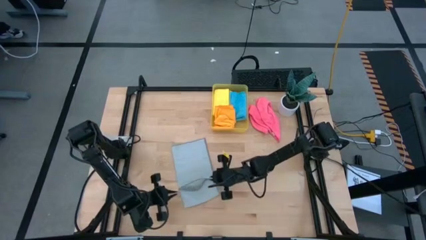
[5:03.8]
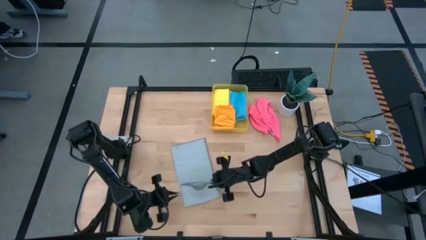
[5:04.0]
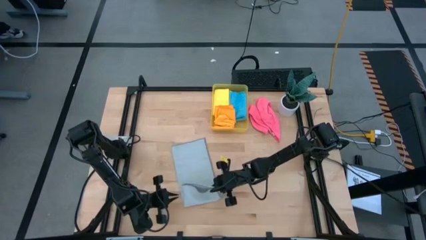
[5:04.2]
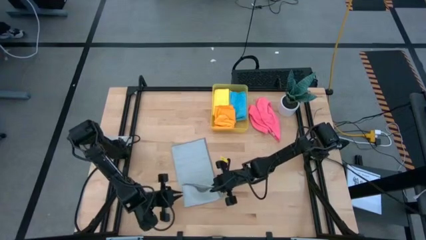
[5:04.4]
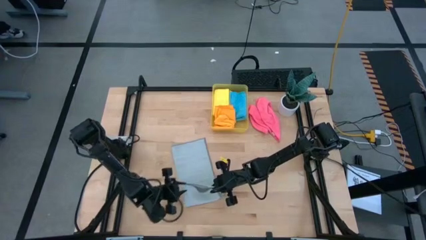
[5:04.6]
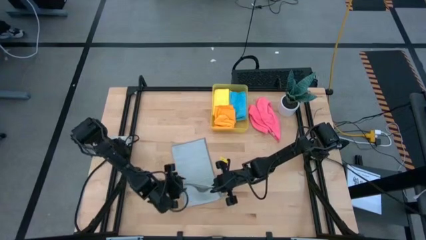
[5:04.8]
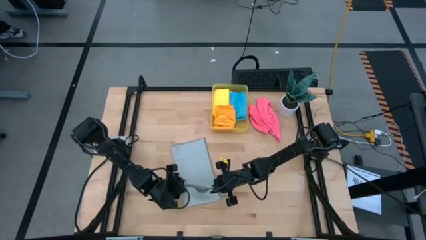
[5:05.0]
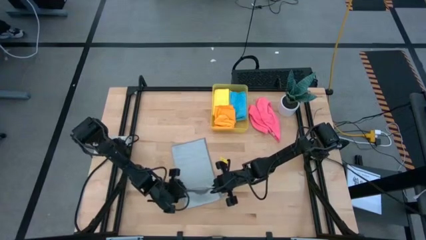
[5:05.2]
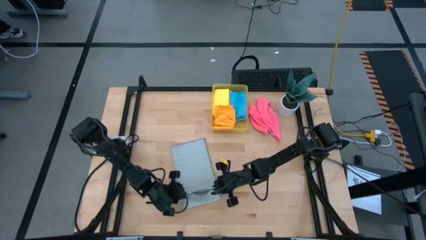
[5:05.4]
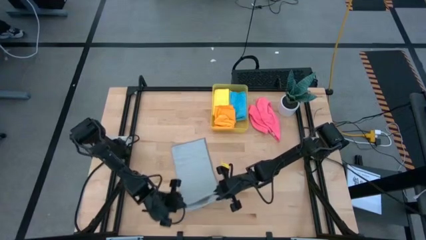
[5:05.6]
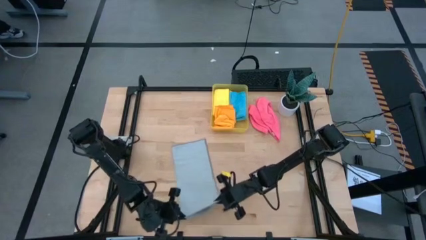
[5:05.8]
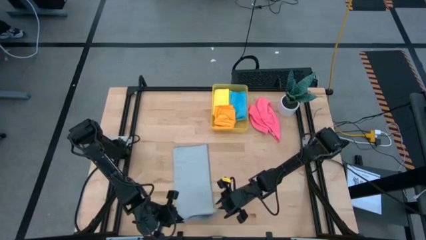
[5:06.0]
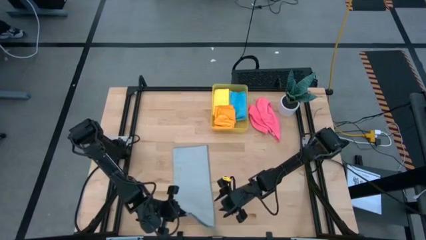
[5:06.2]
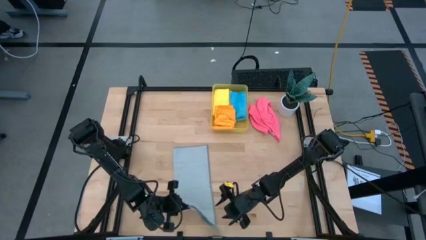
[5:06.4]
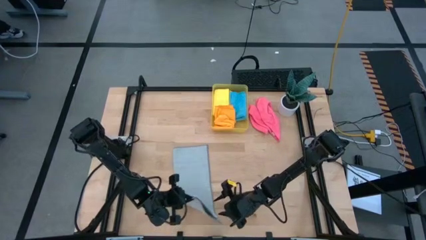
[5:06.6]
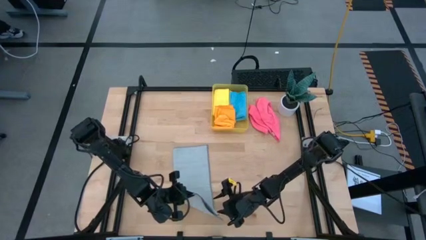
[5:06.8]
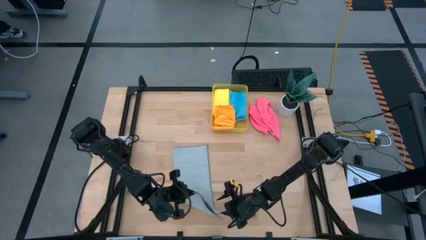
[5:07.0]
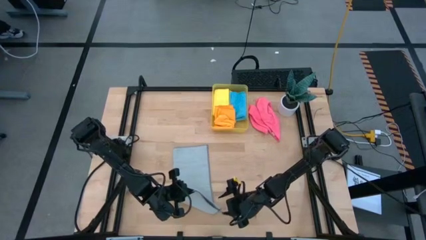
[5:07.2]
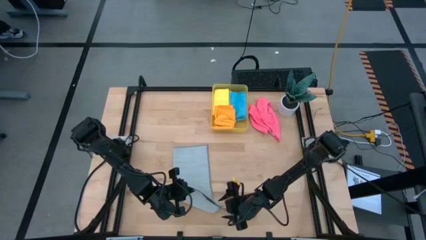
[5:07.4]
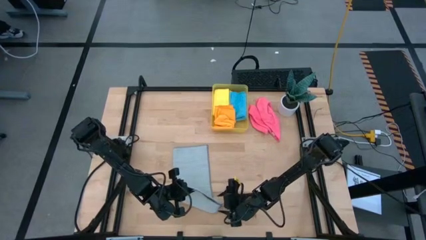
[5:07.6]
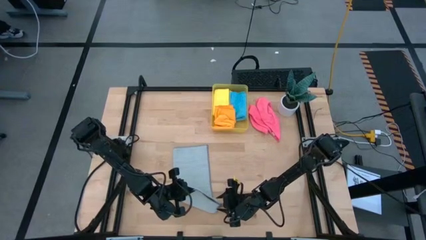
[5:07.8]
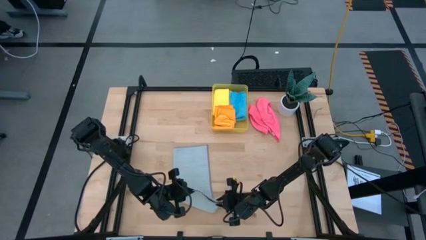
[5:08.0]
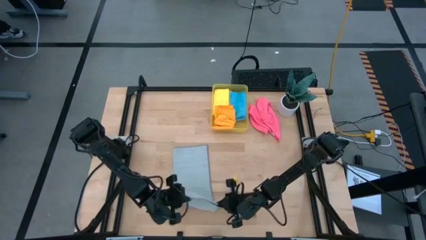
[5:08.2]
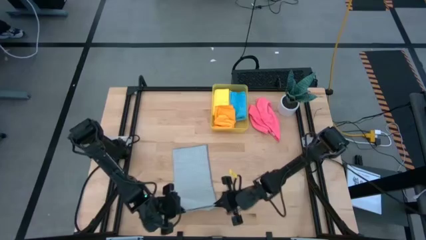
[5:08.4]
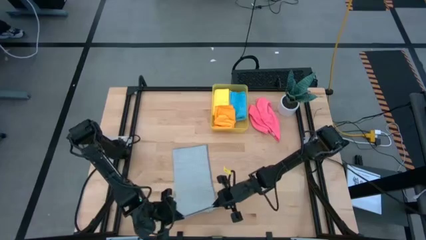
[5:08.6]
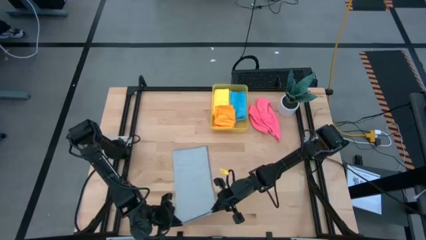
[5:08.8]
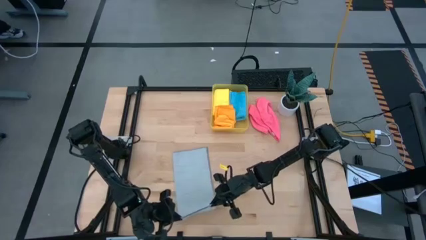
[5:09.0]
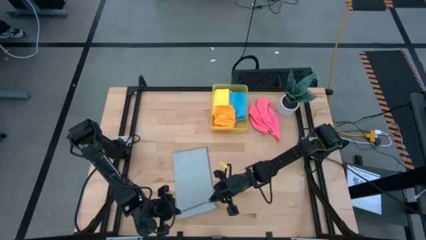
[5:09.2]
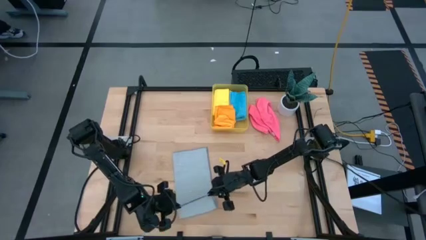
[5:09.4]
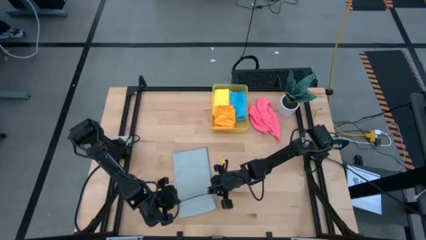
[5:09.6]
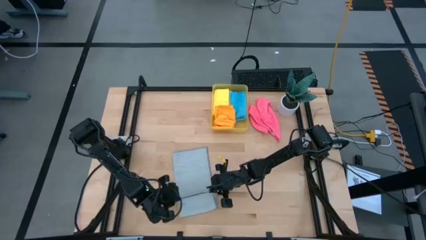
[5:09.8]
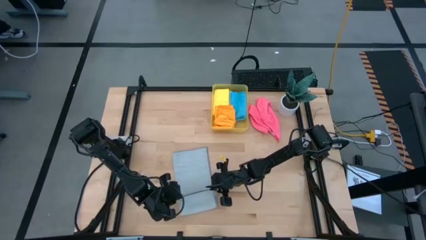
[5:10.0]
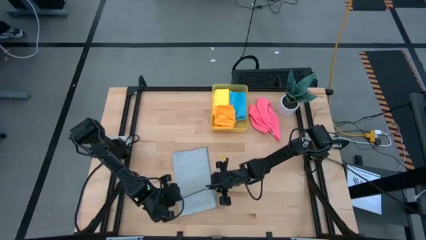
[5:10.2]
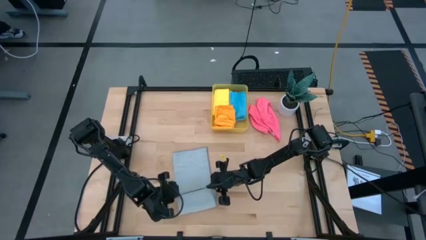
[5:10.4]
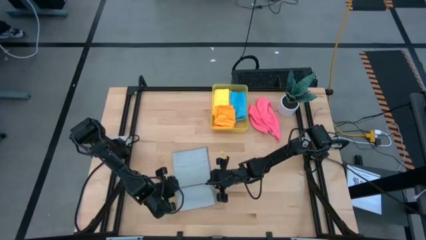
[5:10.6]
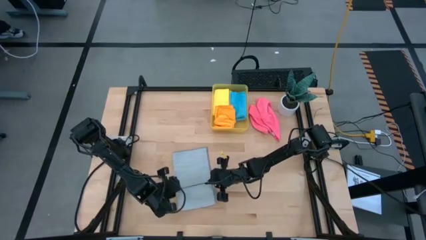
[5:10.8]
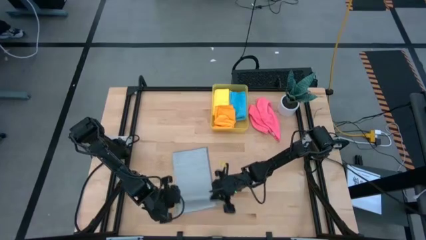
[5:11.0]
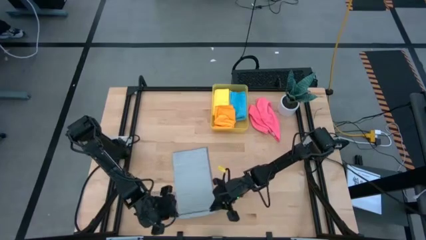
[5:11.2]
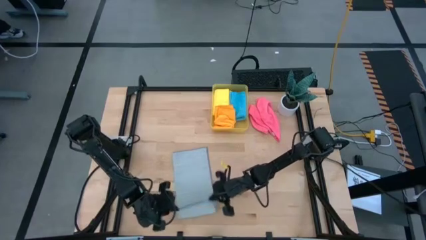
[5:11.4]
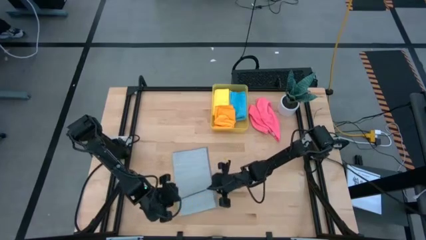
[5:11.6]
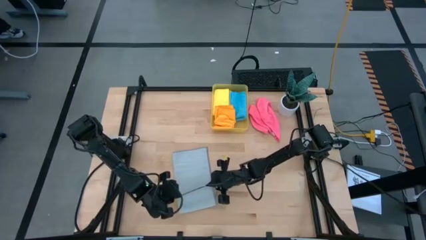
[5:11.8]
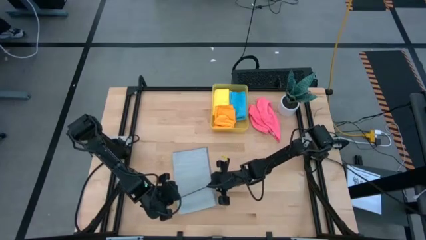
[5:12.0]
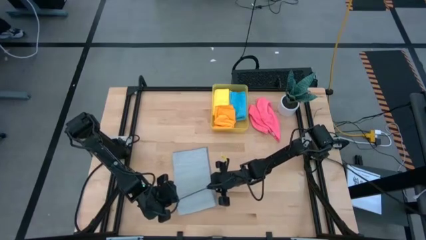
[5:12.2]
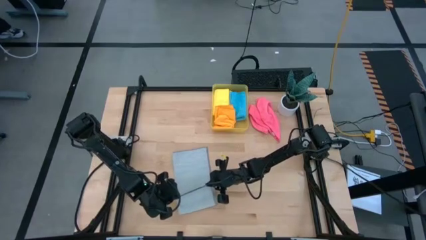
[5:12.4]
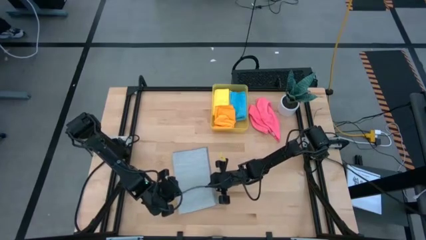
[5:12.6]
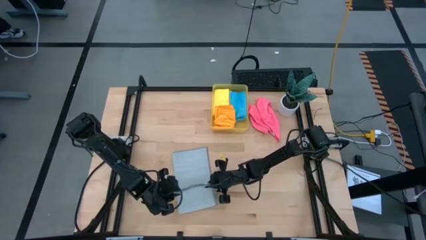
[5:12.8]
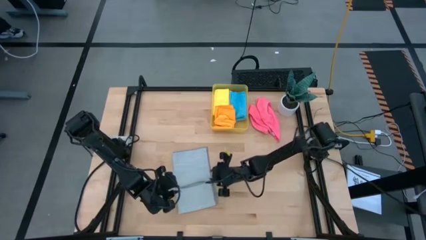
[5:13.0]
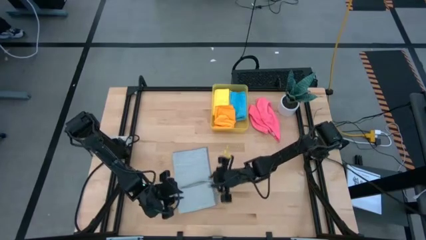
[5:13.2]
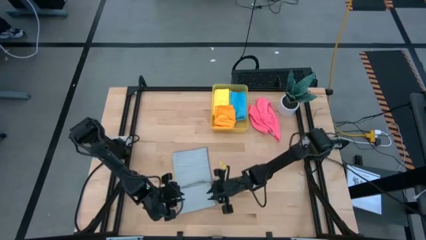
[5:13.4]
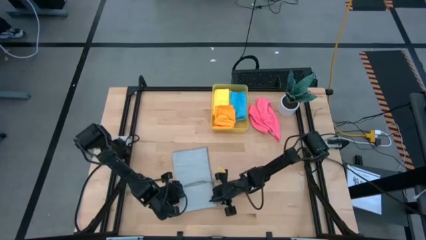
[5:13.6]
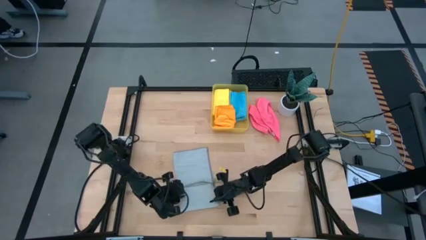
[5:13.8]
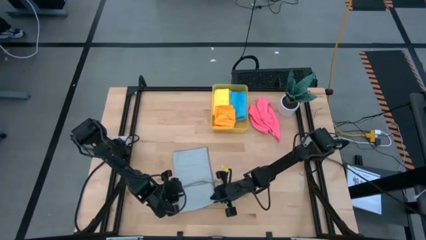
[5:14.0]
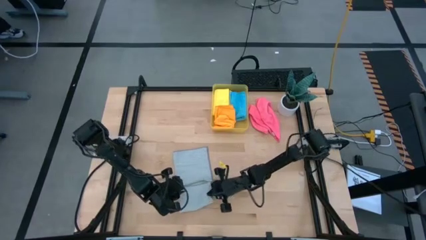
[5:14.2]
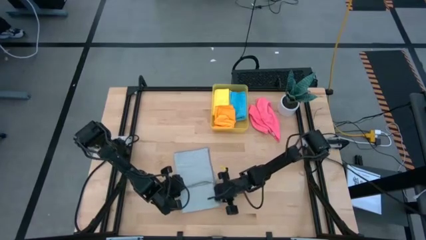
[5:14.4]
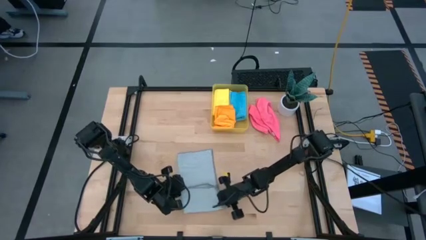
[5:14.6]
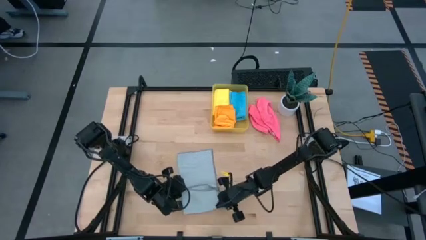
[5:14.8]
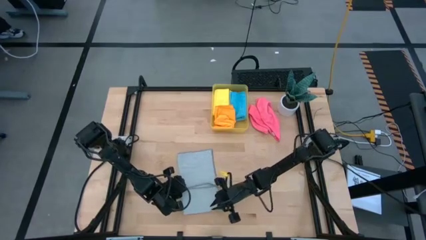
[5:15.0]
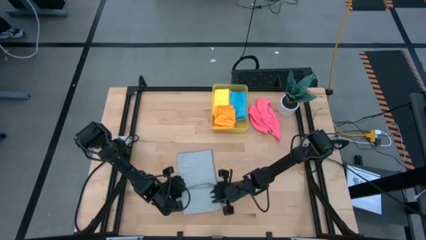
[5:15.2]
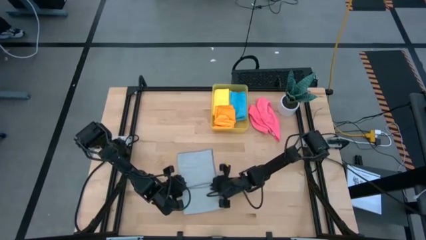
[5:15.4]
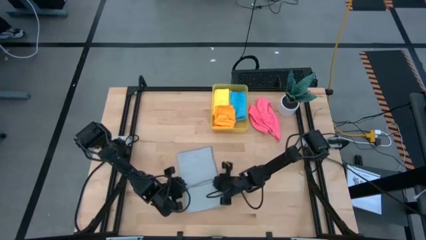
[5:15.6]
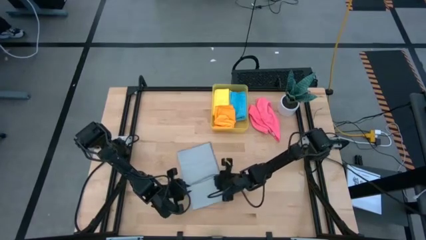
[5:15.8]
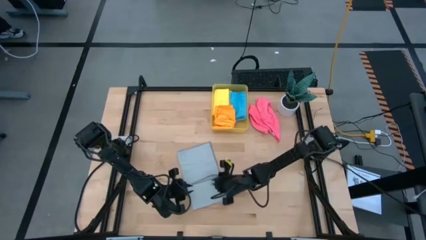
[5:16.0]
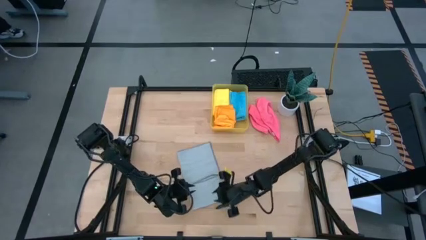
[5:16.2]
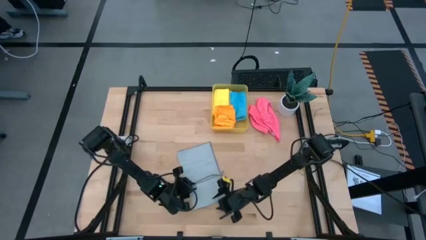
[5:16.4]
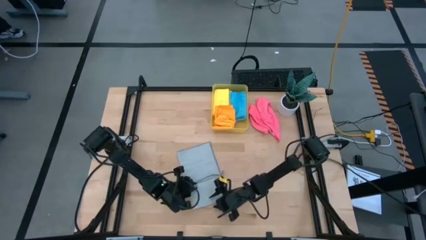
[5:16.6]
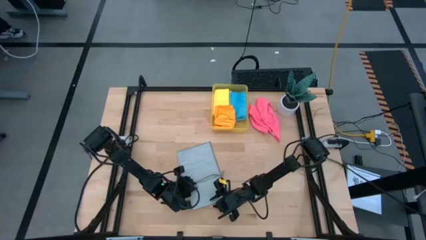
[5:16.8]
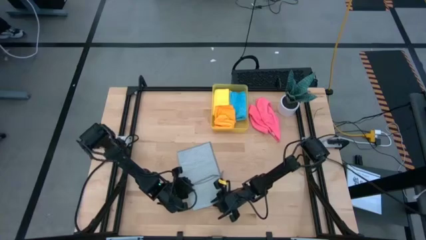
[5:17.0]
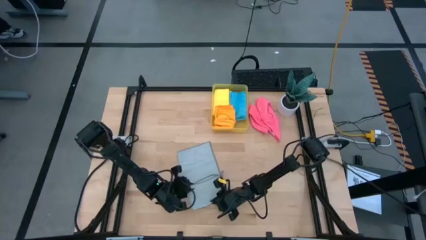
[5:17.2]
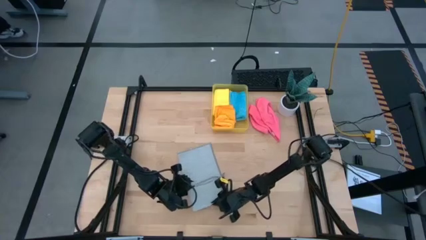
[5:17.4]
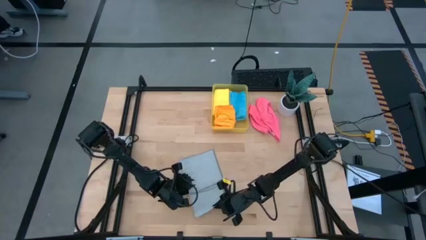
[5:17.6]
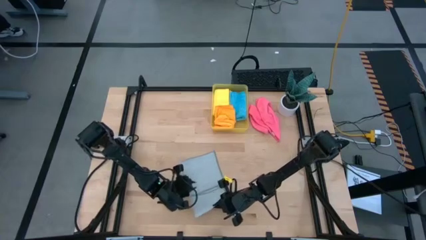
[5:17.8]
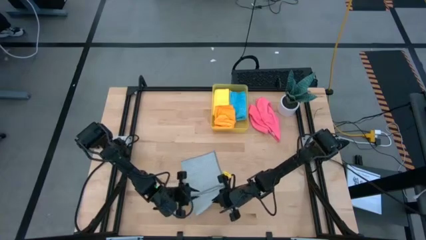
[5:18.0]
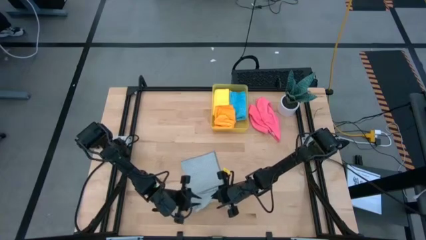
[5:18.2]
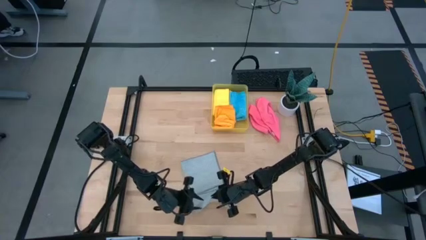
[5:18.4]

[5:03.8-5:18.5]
Task: Fold microfiber towels
Fold the gray microfiber towel

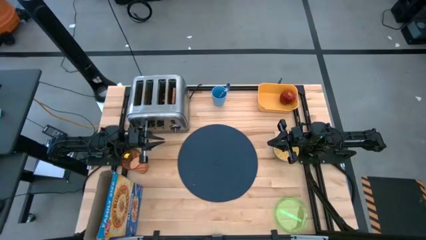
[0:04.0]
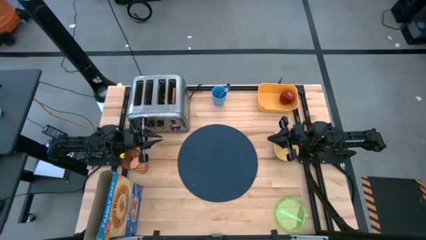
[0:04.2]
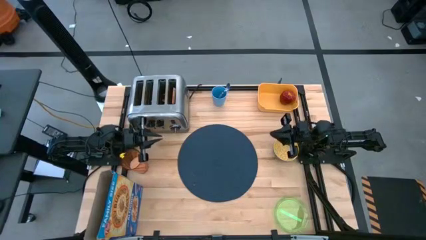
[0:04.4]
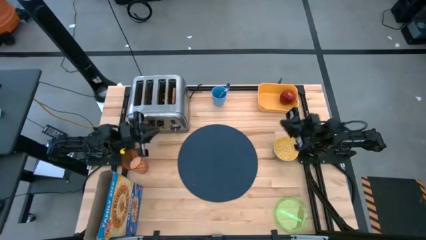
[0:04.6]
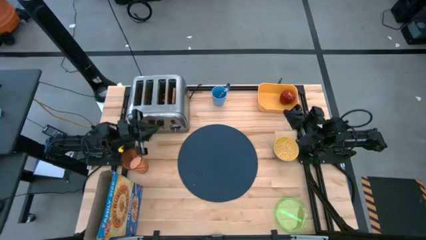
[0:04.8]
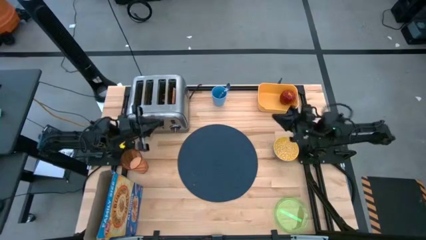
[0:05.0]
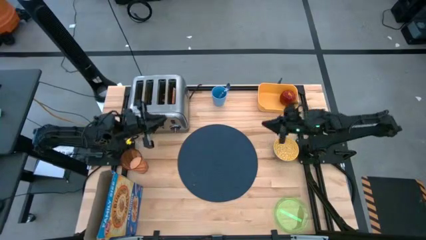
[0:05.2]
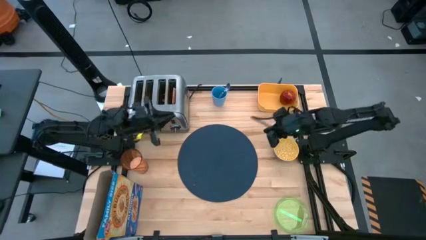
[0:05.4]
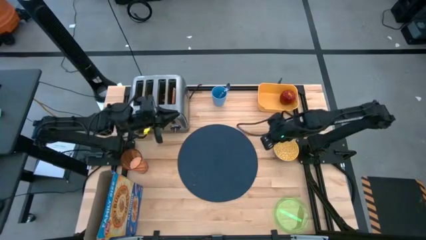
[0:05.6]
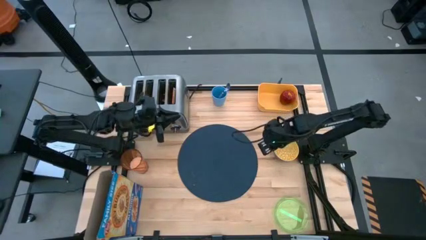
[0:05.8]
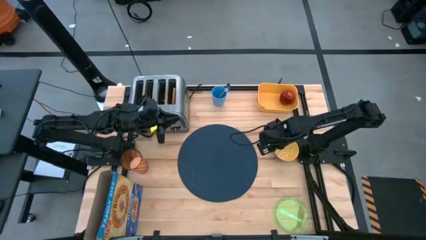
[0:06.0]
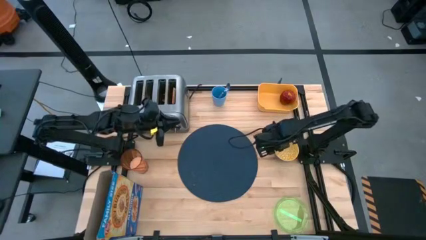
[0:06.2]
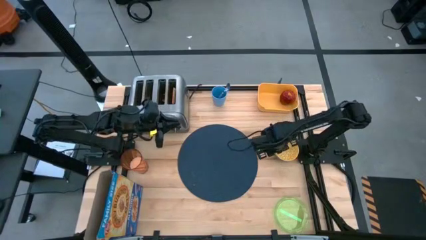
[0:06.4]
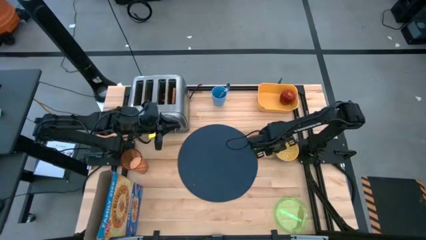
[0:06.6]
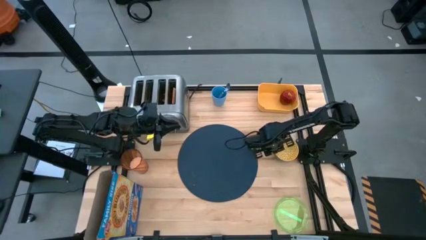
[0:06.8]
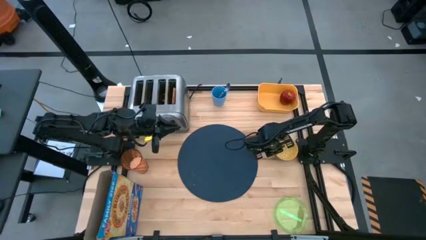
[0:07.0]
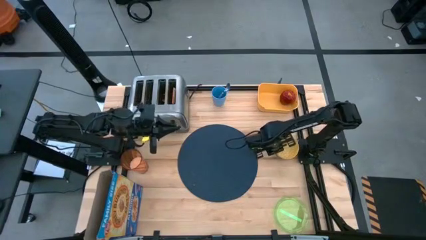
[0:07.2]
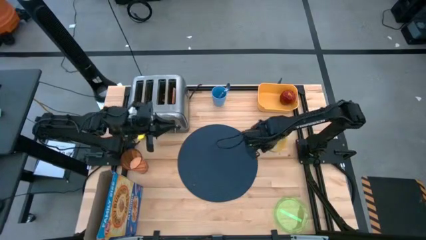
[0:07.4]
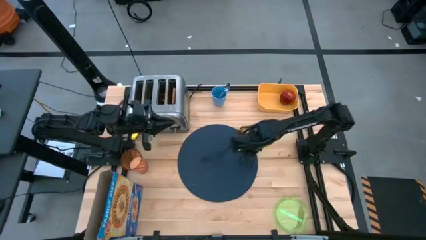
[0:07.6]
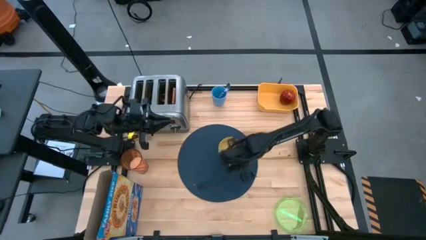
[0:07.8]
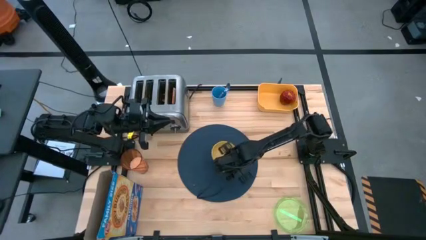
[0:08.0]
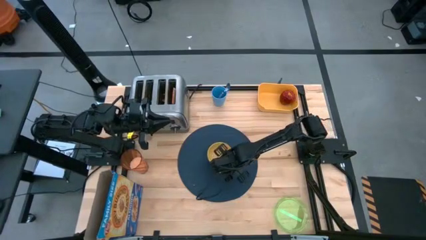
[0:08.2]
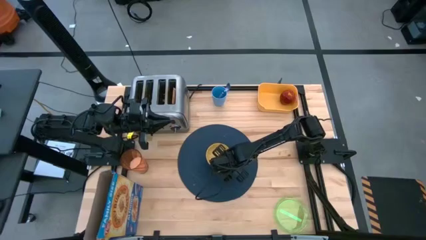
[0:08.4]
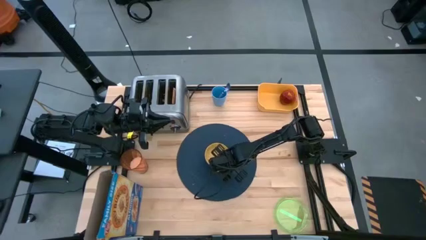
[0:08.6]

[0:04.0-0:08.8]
Task: Arrange a breakfast setting
Put the yellow bowl to the center of the placemat
